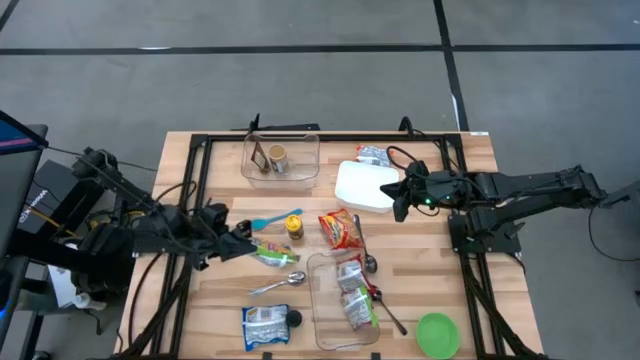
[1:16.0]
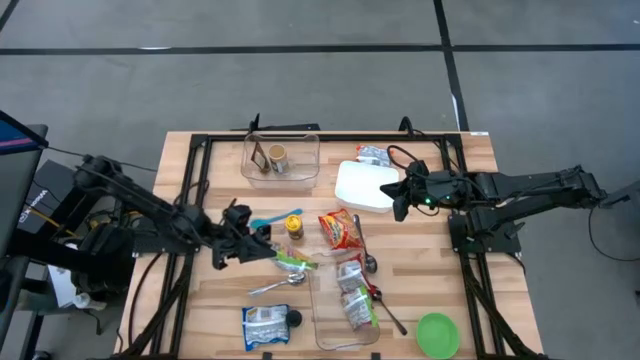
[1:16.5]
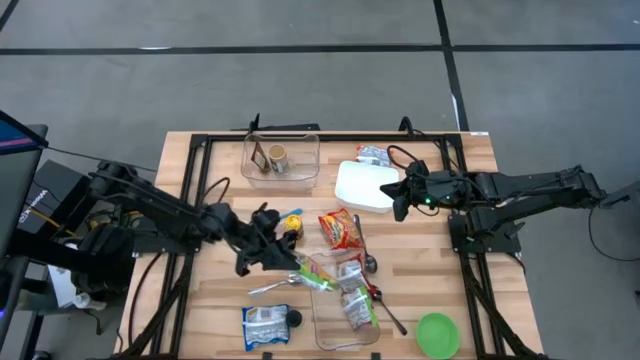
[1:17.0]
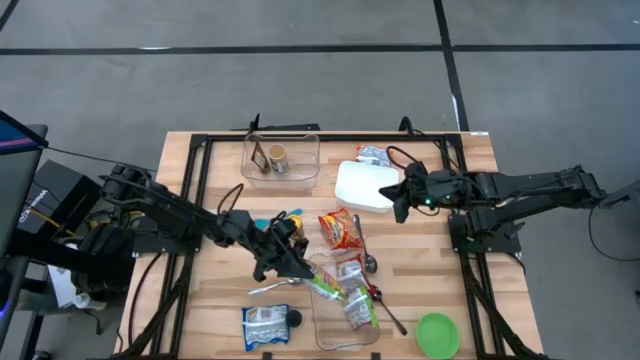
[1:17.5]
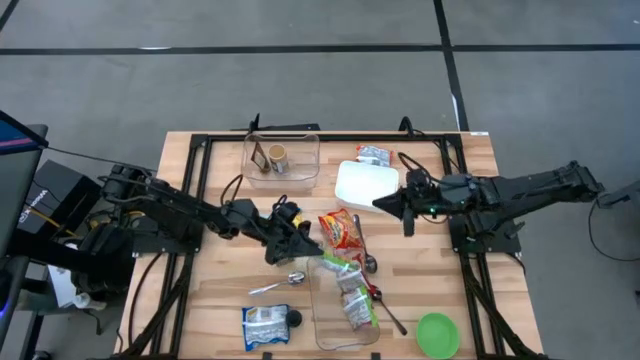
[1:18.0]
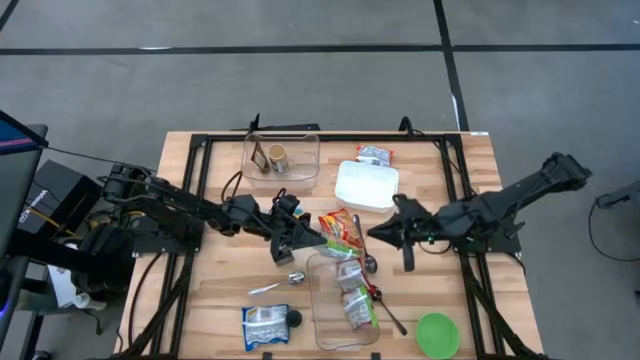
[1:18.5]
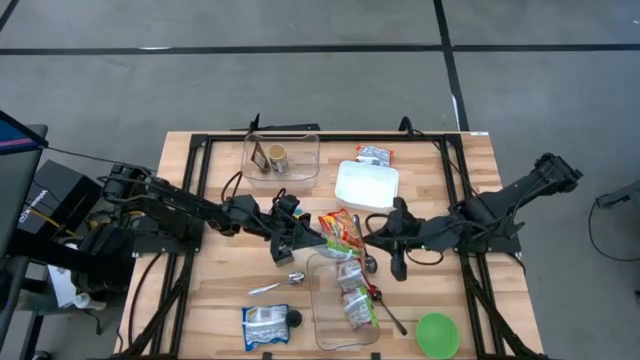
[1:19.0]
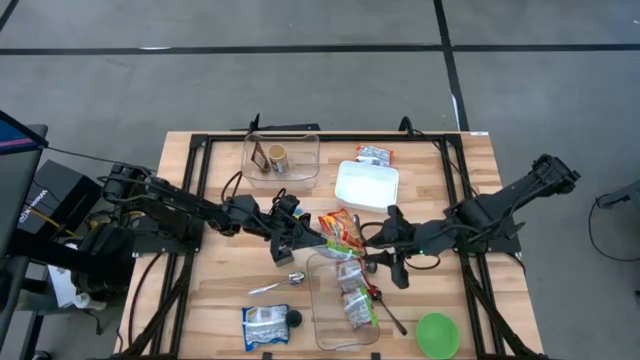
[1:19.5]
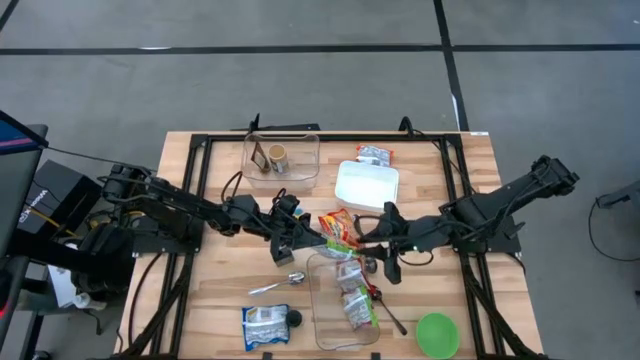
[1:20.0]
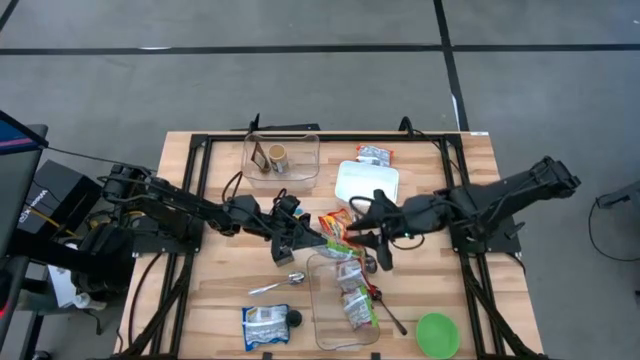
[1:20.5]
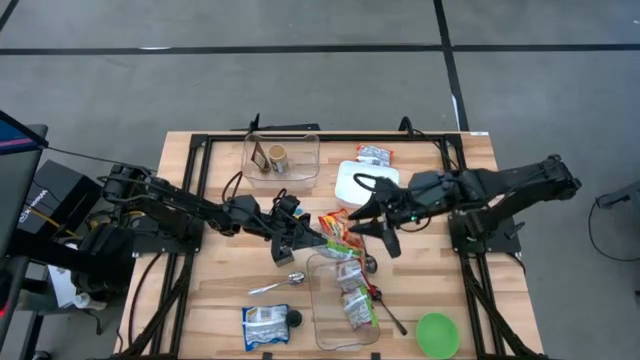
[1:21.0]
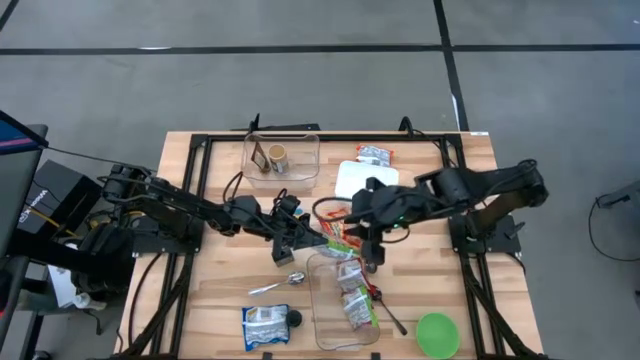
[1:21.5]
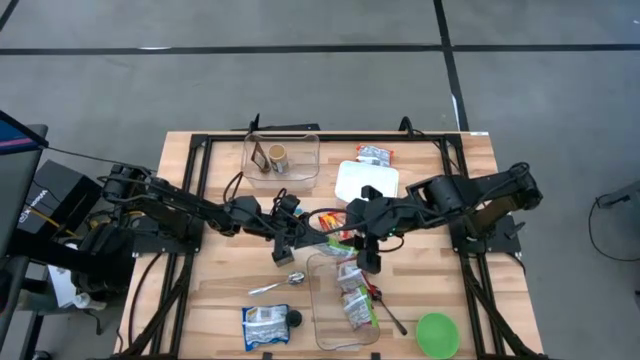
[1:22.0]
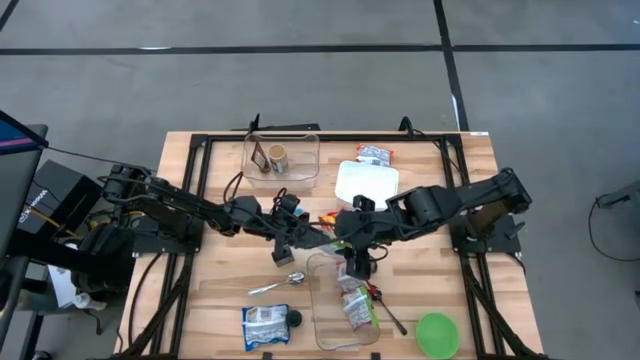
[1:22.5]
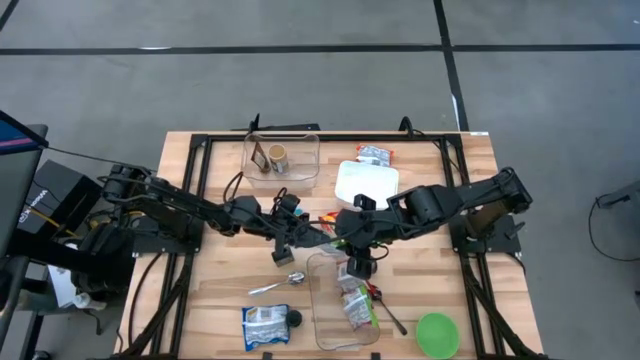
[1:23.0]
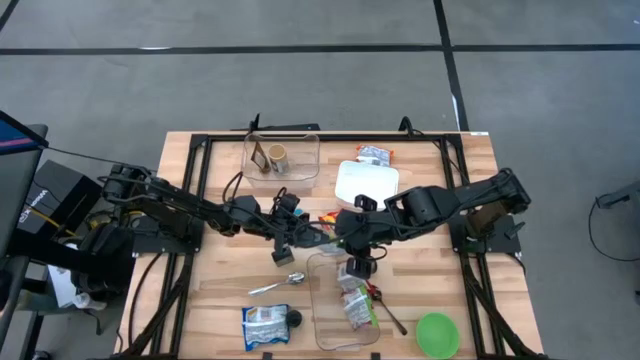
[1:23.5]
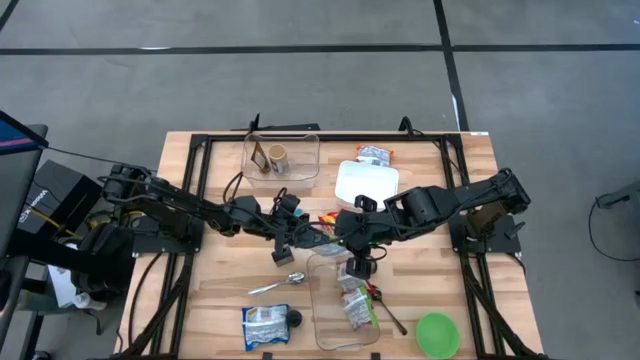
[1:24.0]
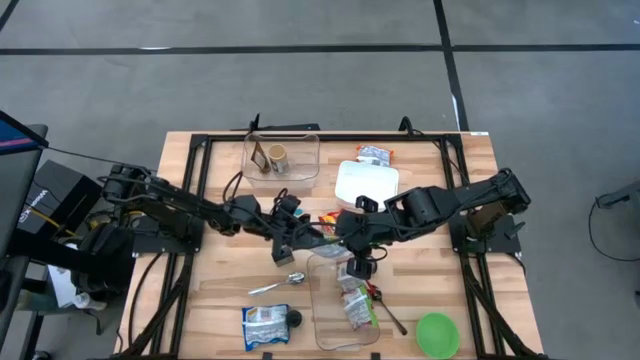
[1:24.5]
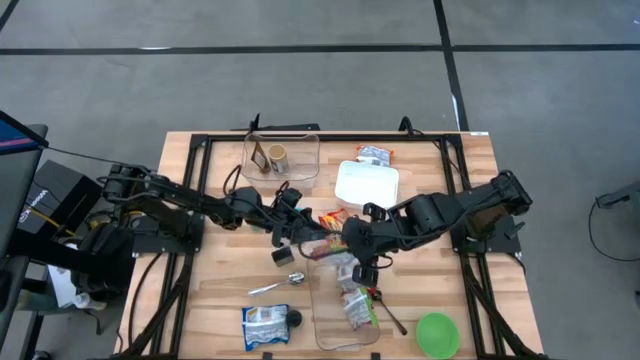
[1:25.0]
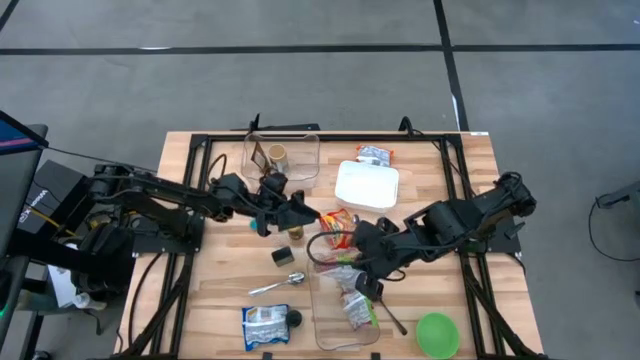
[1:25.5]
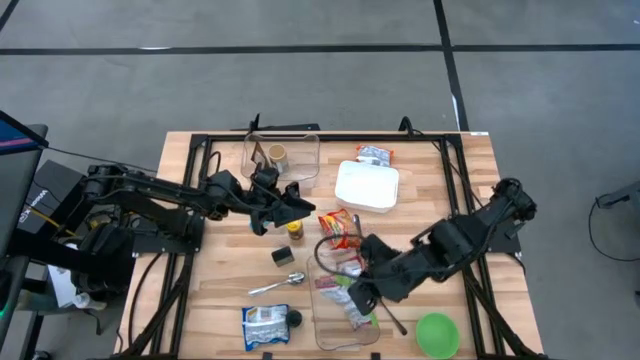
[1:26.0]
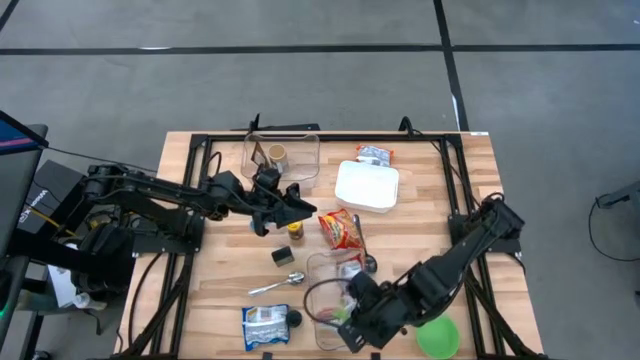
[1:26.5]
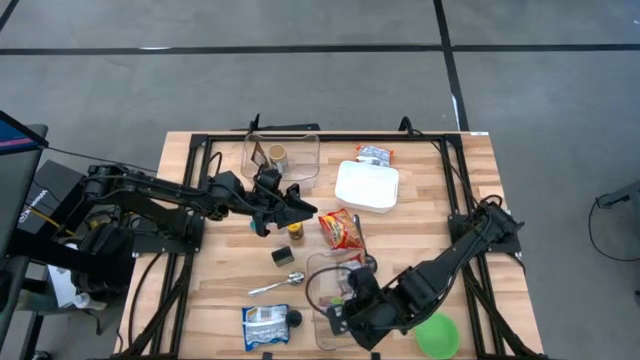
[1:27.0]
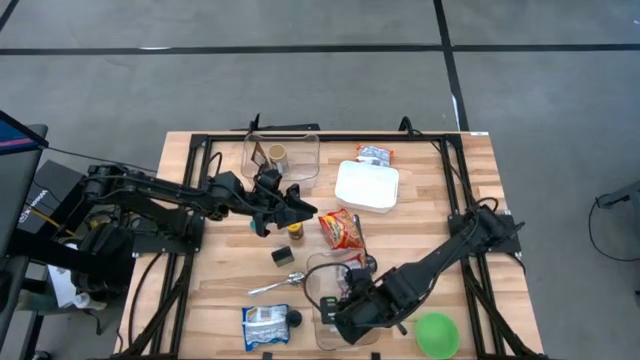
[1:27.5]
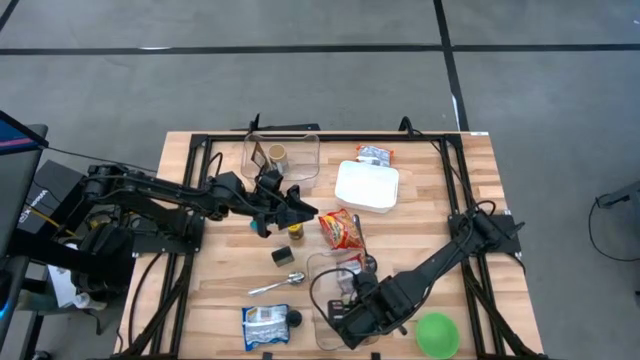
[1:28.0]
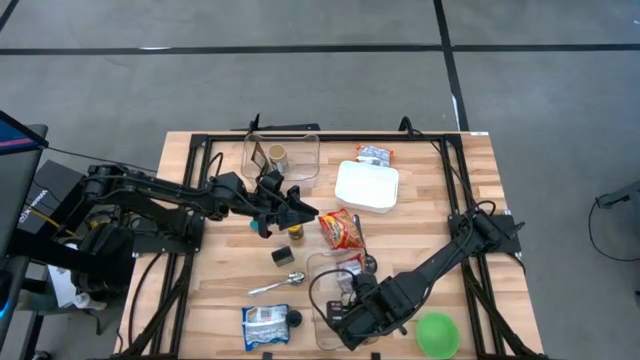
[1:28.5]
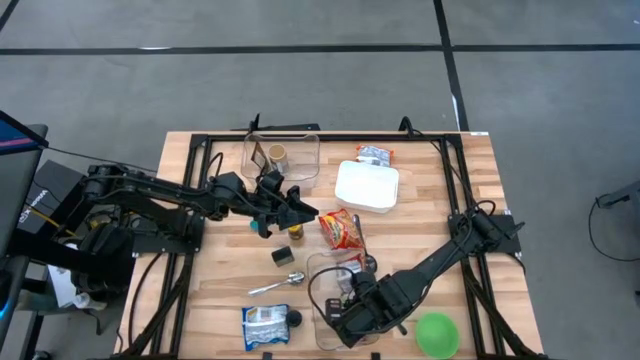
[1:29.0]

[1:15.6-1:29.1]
Task: Pick & Place Food Item
Put the green noodle pack into the bottom transparent bin

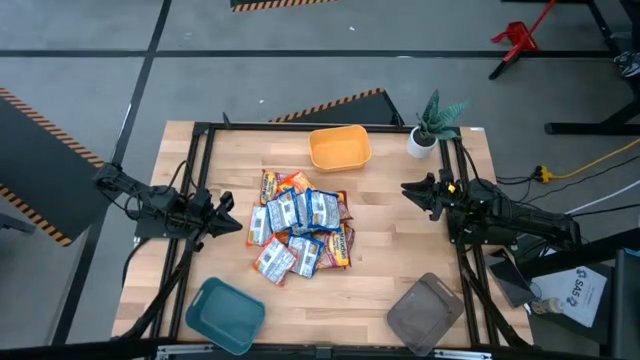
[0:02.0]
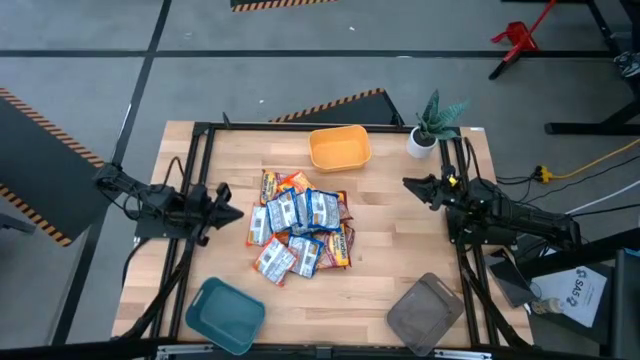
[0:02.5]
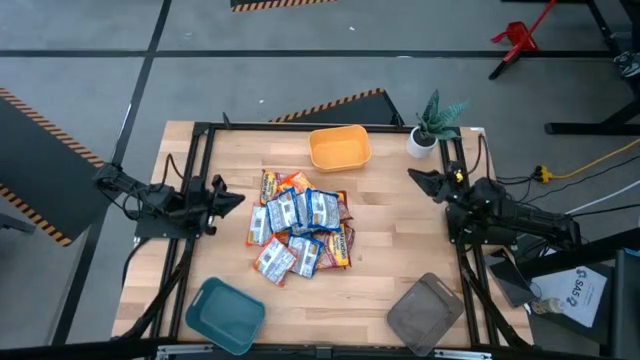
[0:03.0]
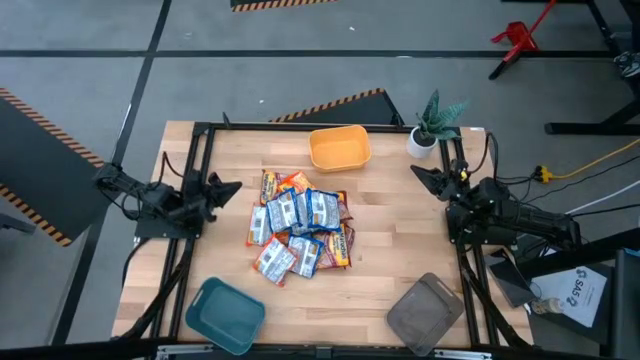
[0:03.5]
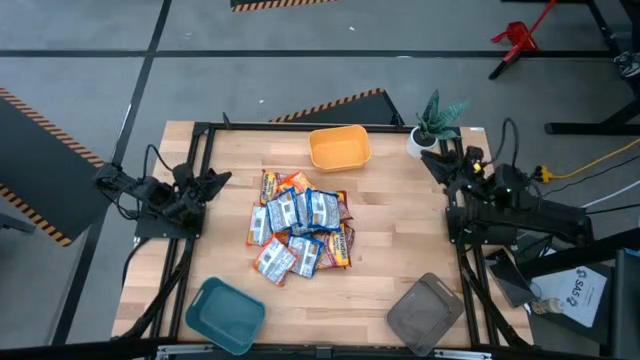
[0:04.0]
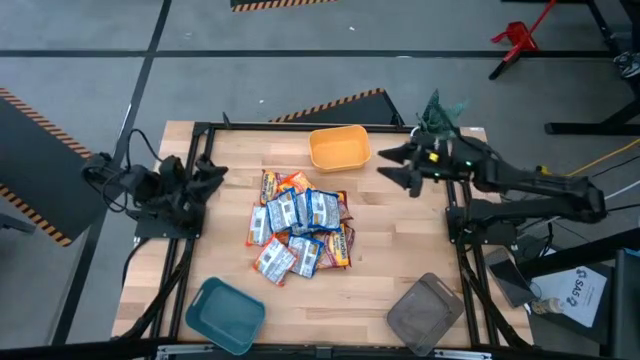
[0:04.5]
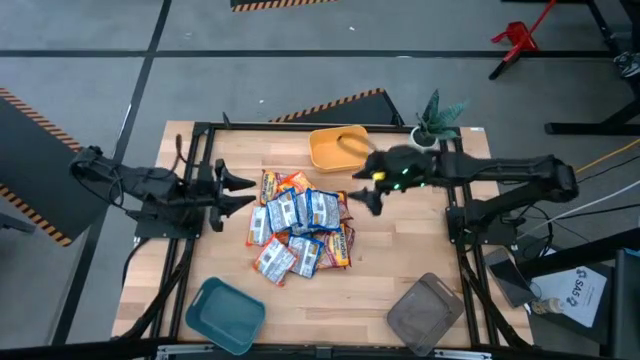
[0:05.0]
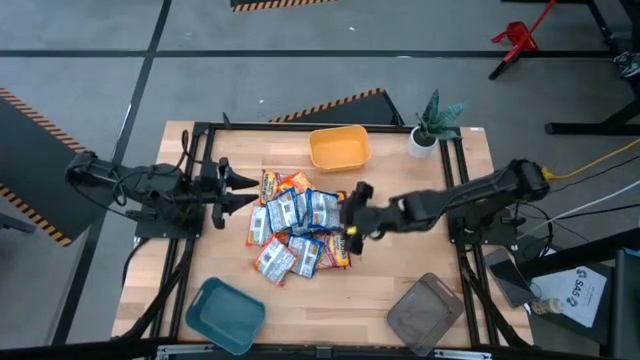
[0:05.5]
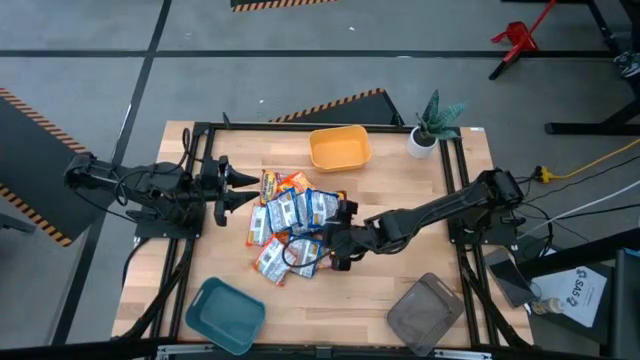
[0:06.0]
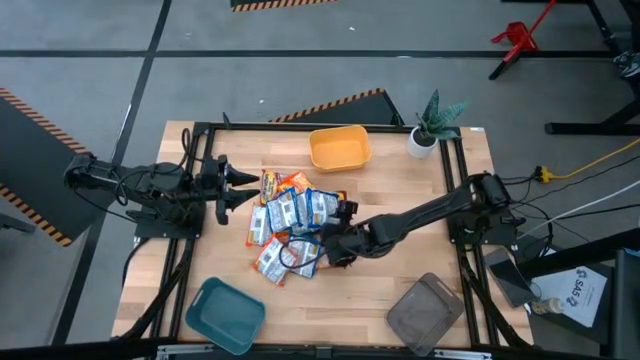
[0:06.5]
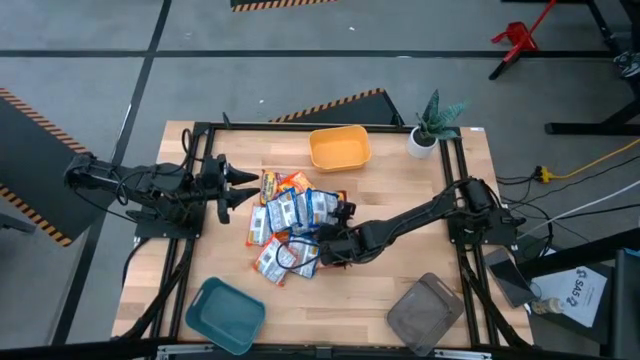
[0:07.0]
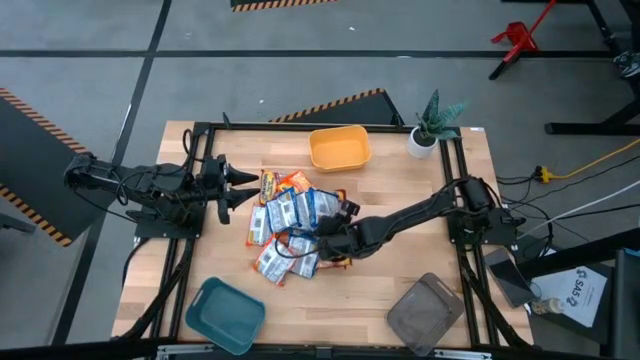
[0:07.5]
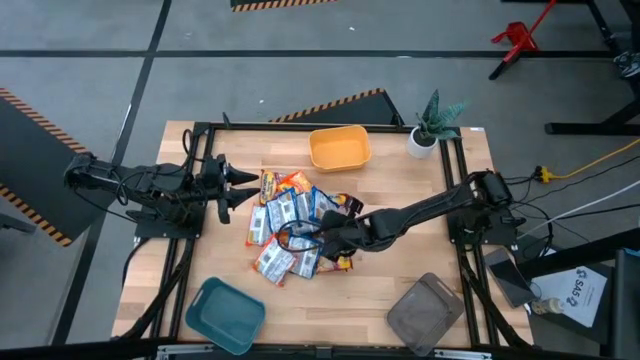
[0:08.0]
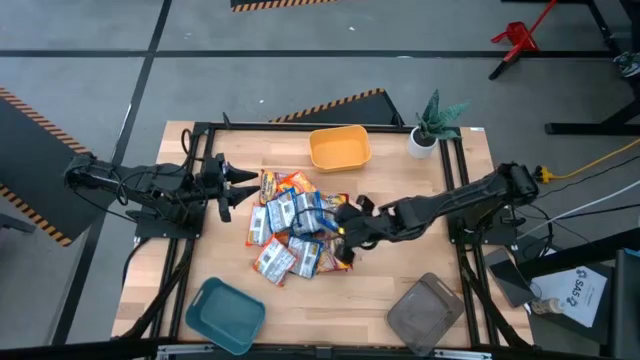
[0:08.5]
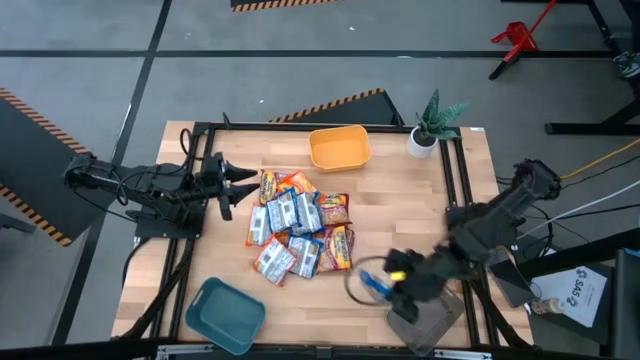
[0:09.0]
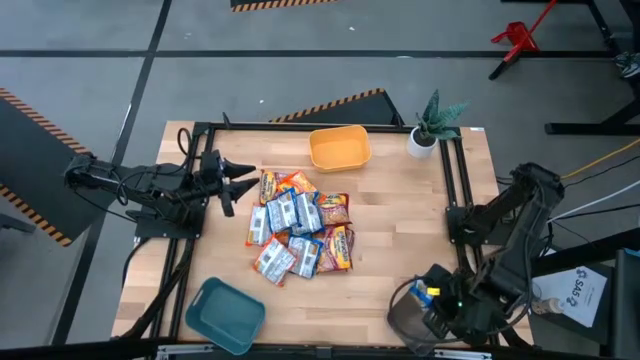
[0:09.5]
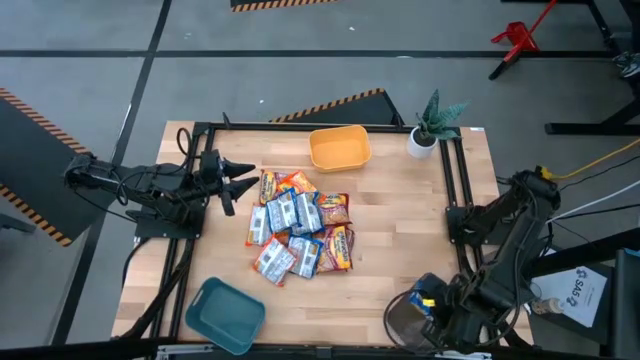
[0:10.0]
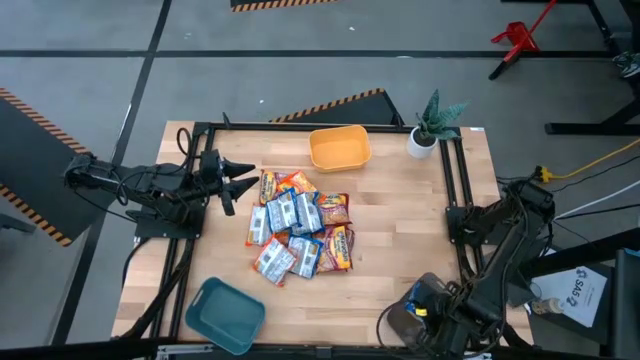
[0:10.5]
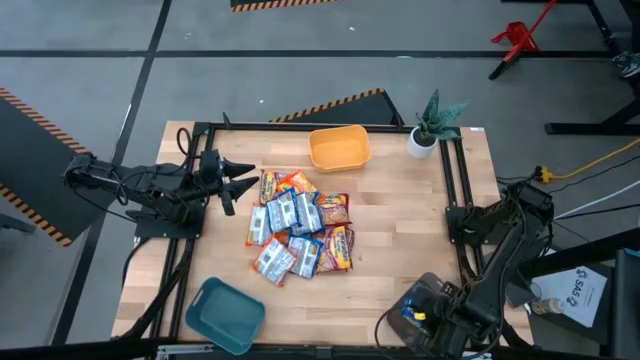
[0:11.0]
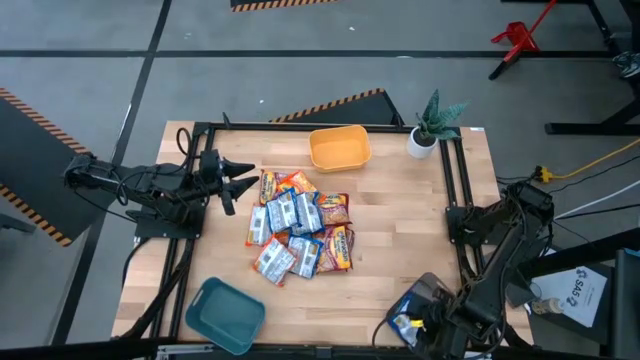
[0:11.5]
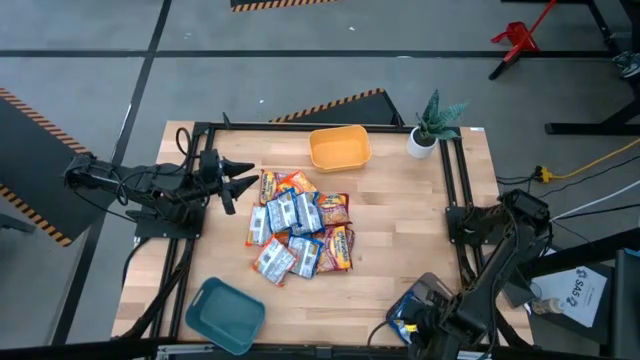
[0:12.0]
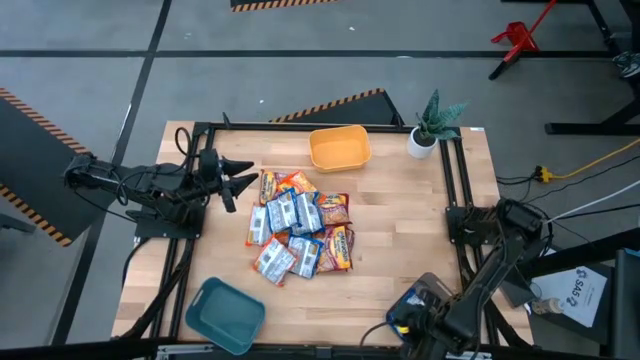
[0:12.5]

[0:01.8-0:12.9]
Task: Sort Maruchan noodles
Put the blue noodle pack into the black bin
